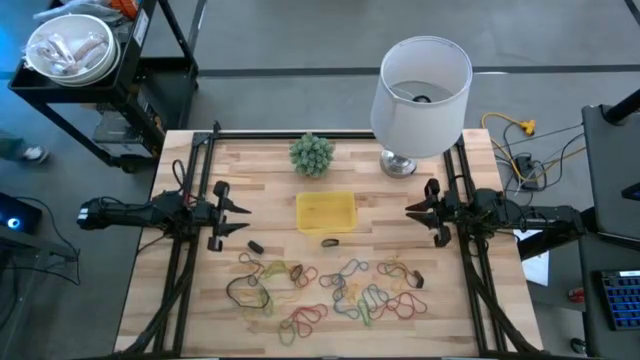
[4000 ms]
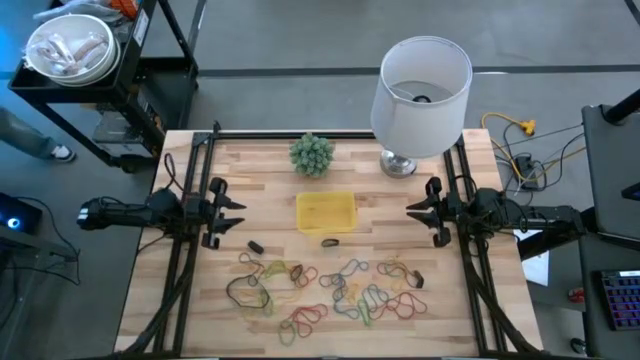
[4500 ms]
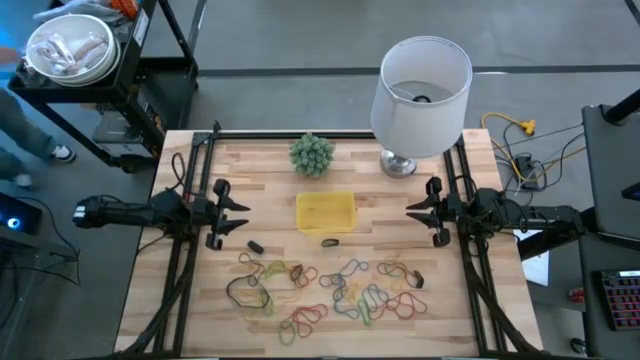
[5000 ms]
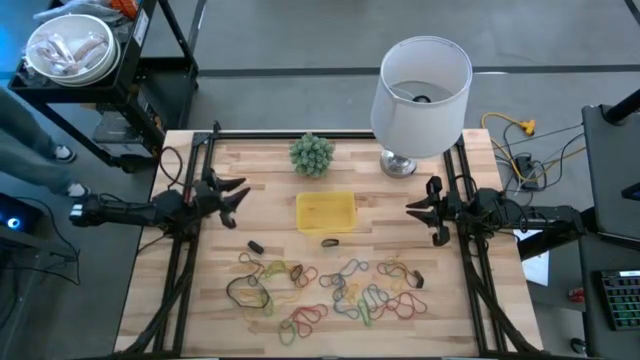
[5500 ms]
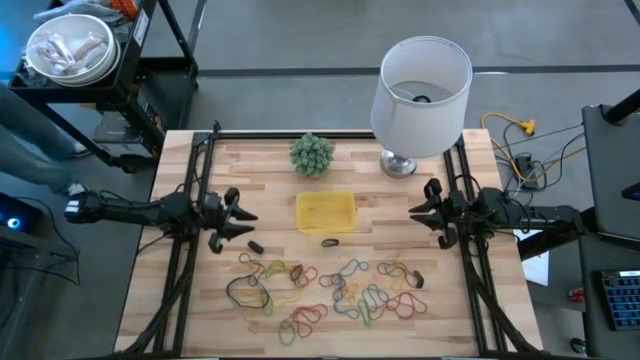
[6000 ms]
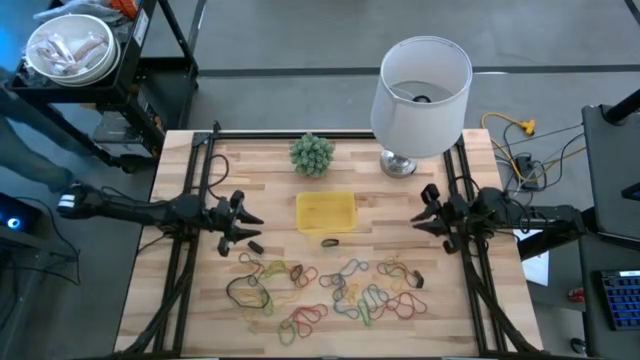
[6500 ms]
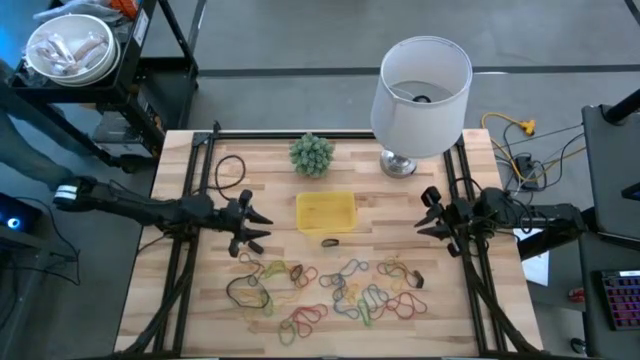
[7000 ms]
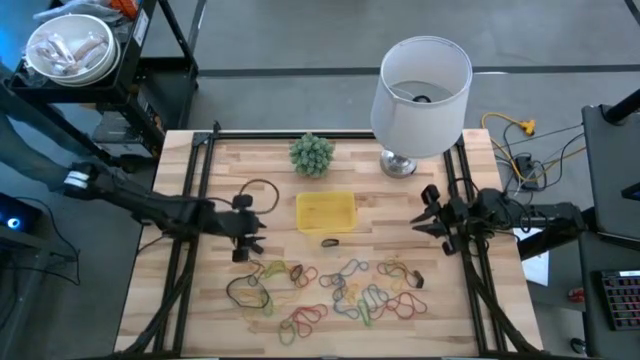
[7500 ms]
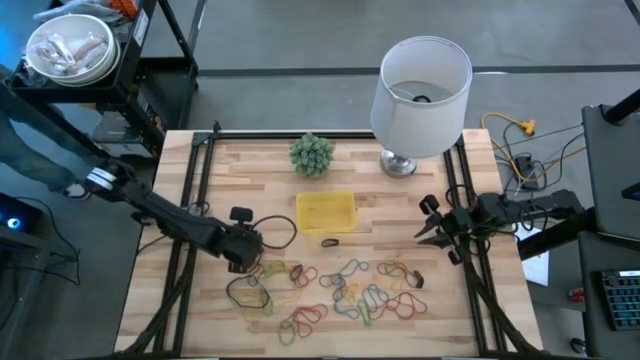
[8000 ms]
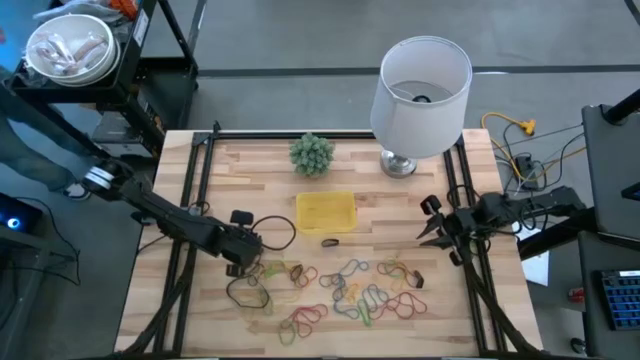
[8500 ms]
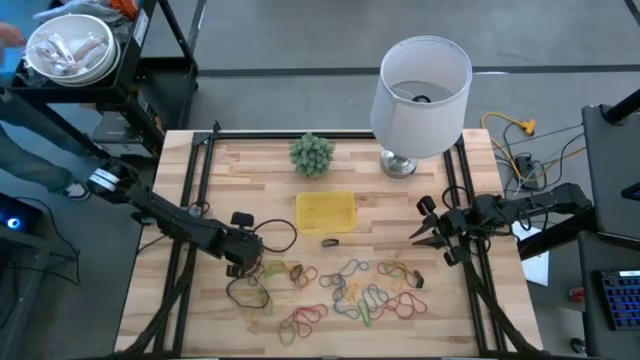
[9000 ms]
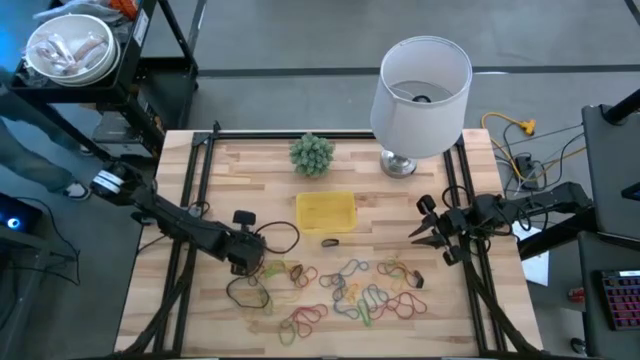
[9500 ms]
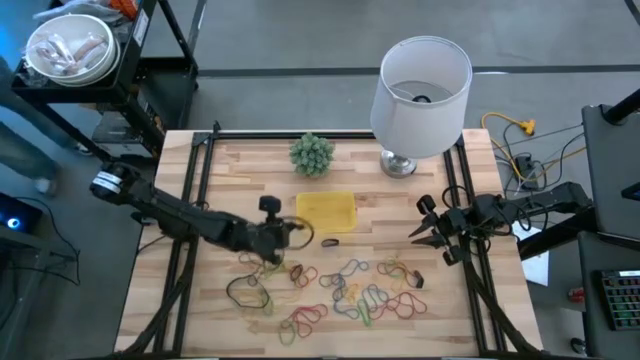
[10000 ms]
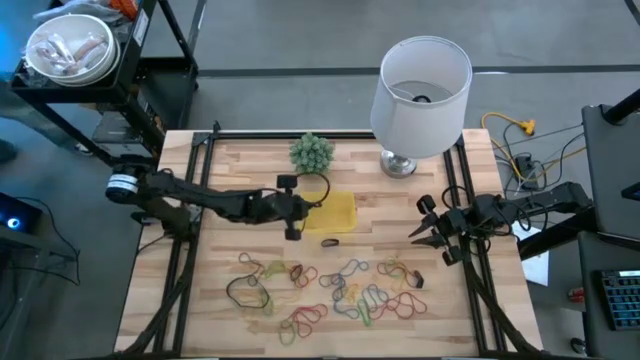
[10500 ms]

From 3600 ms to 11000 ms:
Task: Pick and place rubber bands into bin
Put the black rubber band into the yellow bin

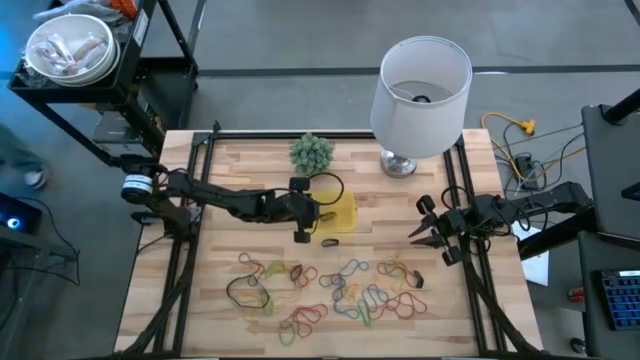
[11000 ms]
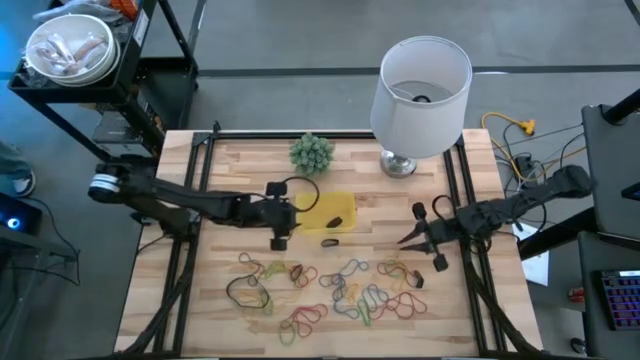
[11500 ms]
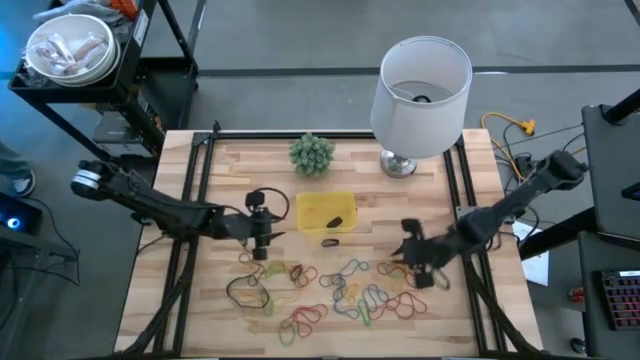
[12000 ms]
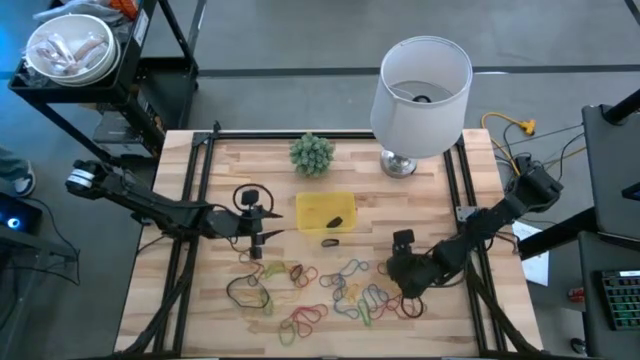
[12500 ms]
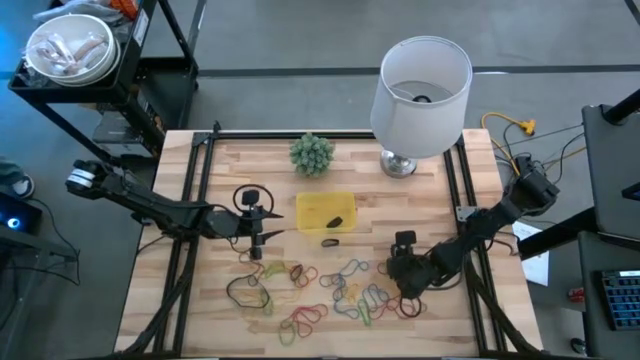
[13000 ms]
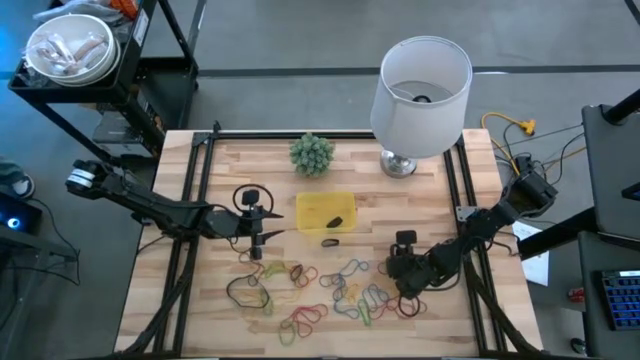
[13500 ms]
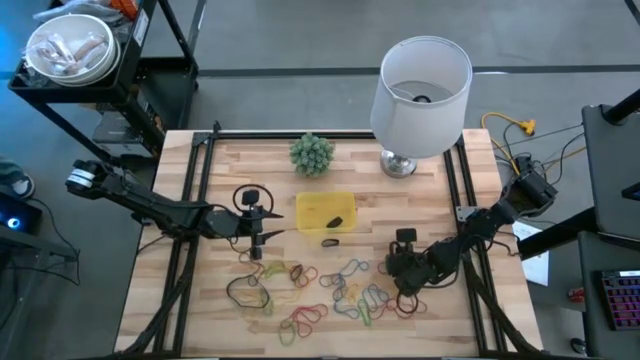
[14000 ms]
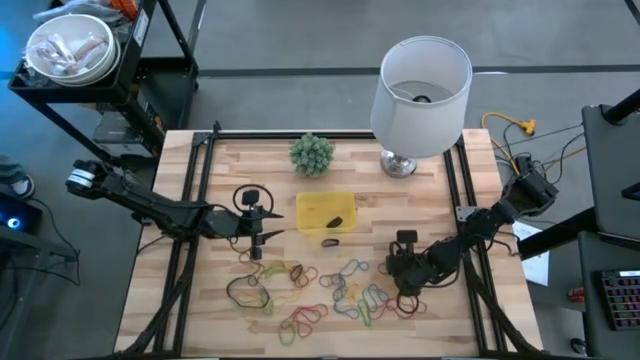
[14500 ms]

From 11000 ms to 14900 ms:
Put the green rubber band into the yellow bin

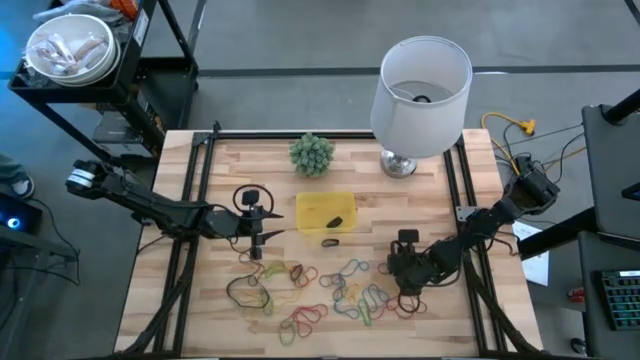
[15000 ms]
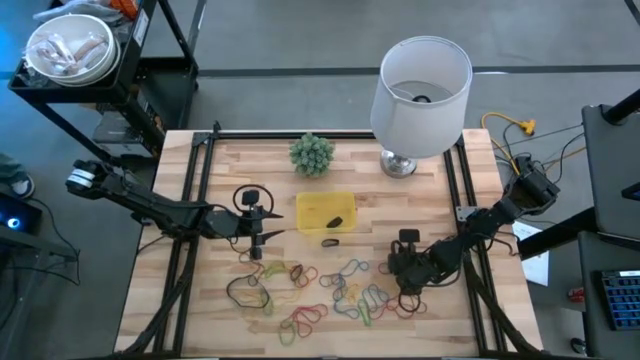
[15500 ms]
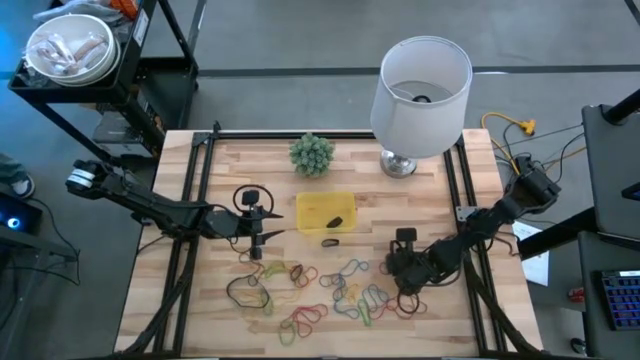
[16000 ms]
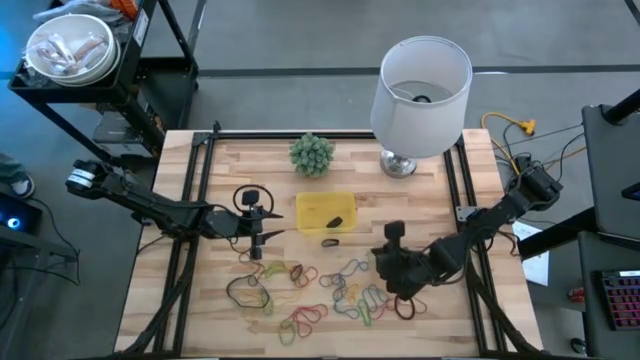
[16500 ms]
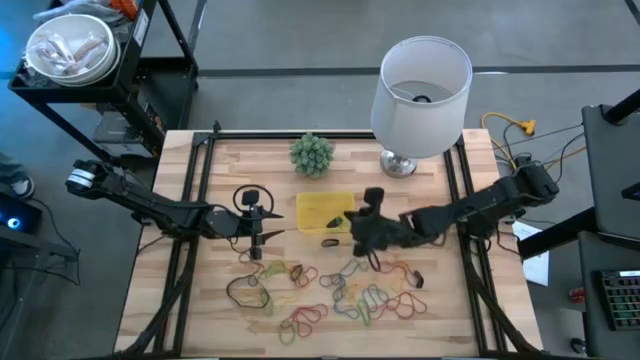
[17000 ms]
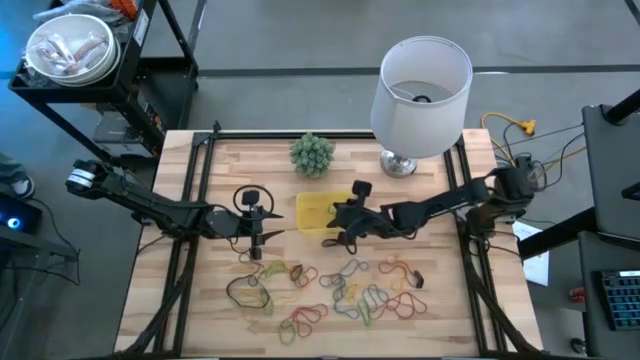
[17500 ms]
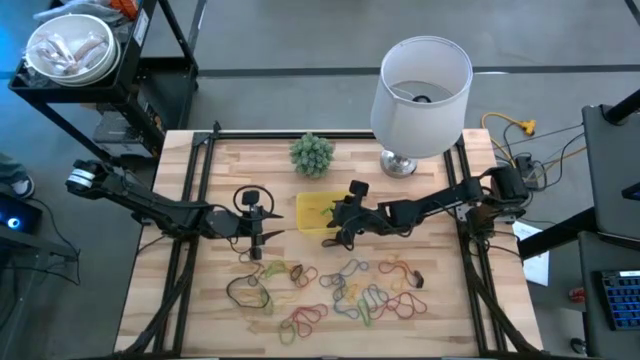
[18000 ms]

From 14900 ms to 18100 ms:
Put the green rubber band into the yellow bin

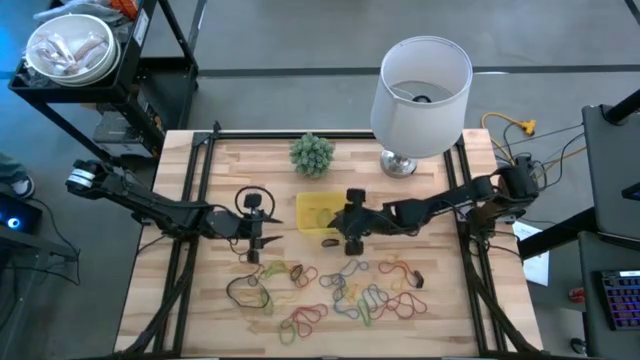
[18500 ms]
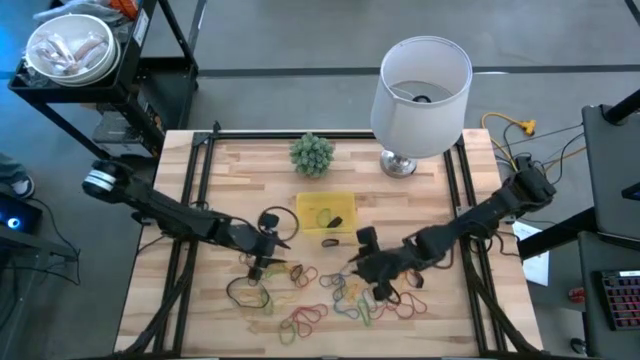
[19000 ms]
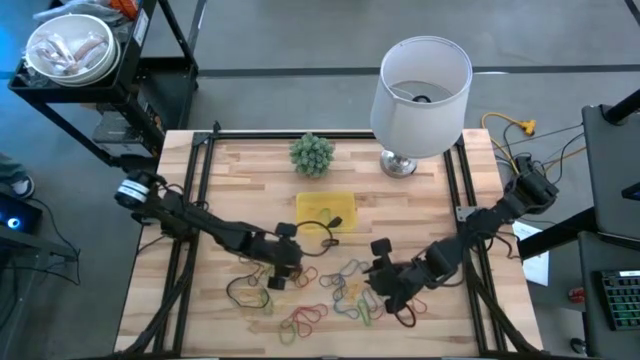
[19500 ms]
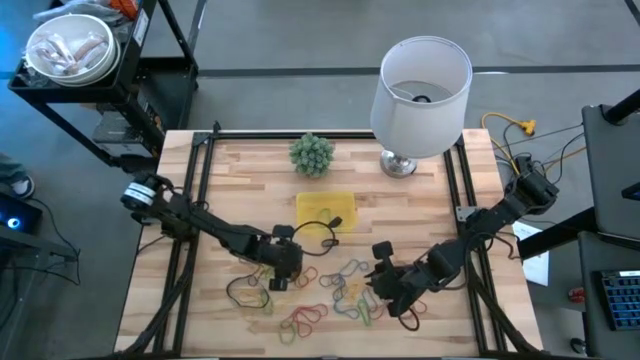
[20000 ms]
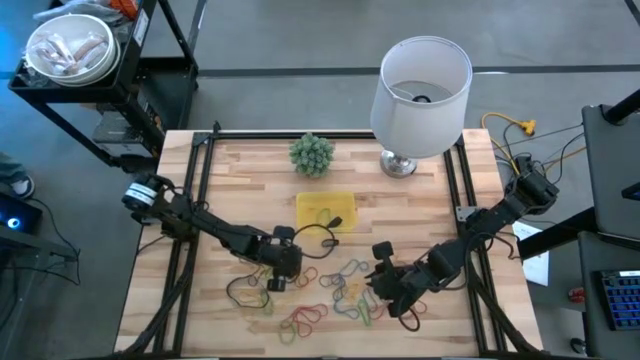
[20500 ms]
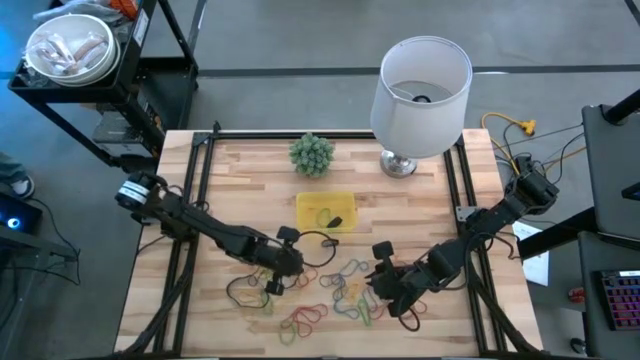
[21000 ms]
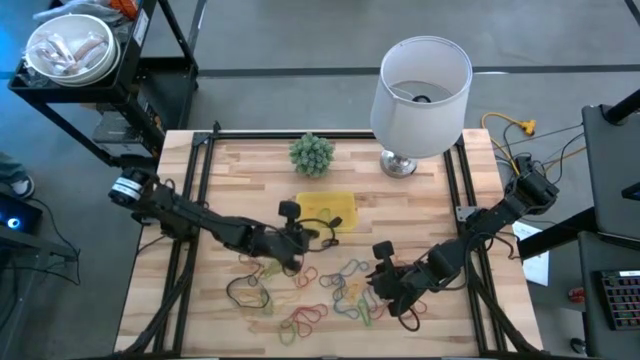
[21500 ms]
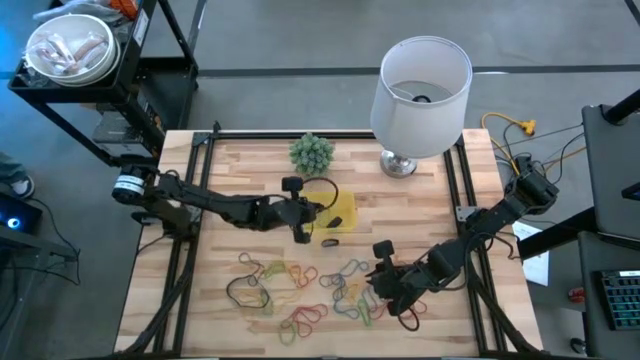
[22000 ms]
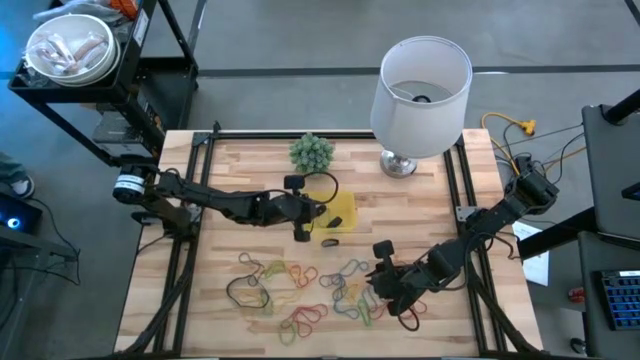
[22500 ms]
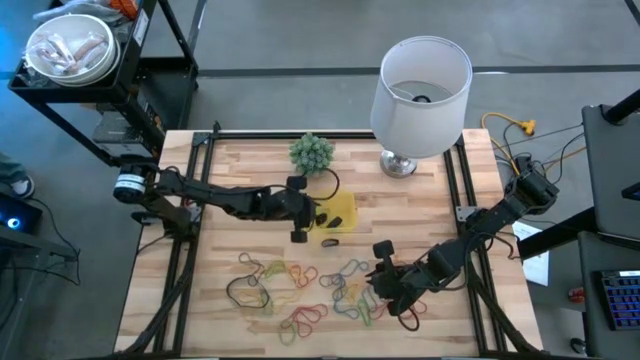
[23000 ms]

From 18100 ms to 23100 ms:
Put the black rubber band into the yellow bin

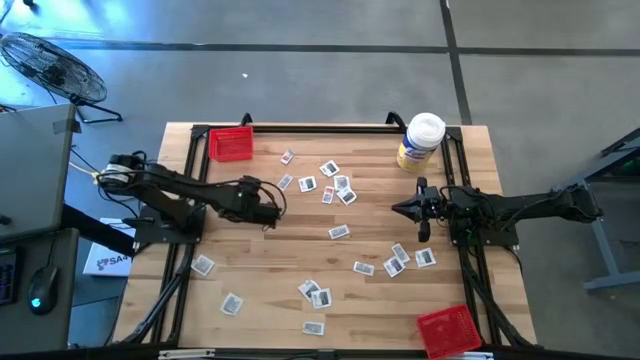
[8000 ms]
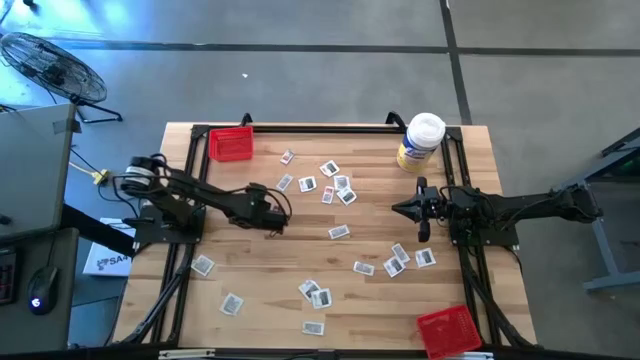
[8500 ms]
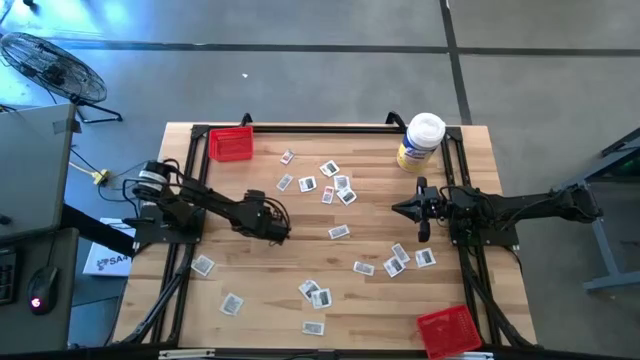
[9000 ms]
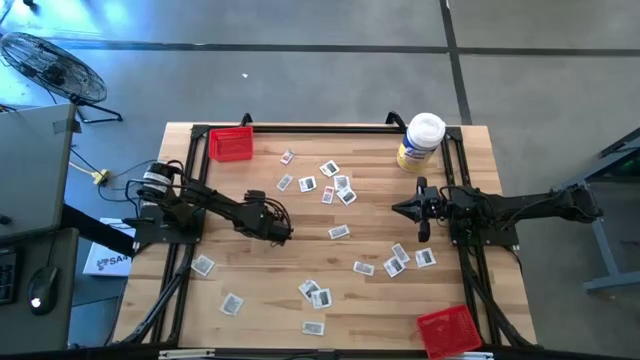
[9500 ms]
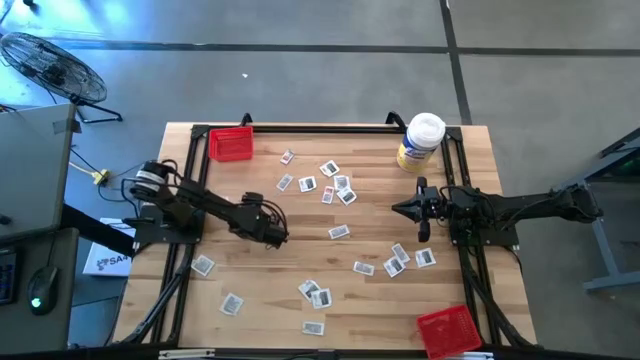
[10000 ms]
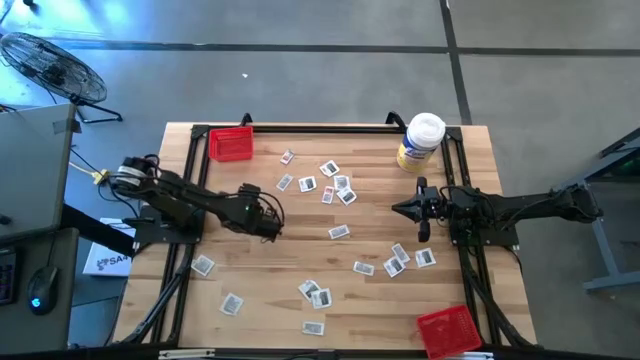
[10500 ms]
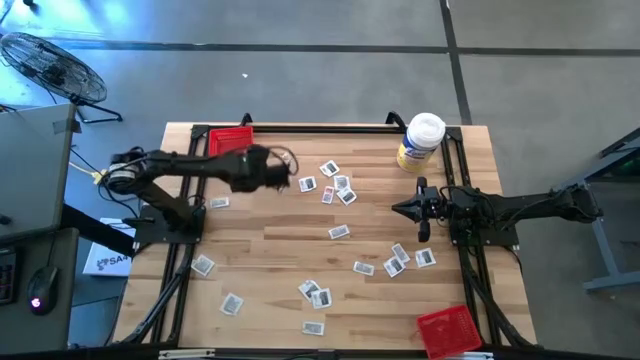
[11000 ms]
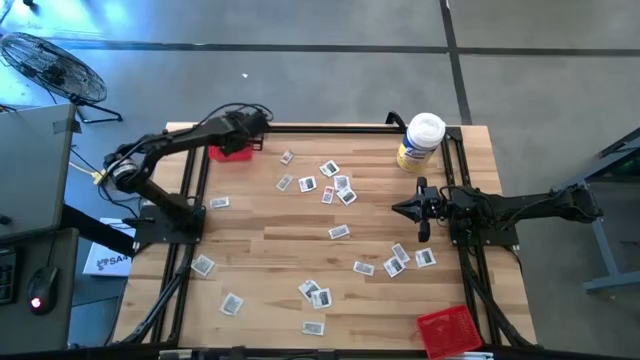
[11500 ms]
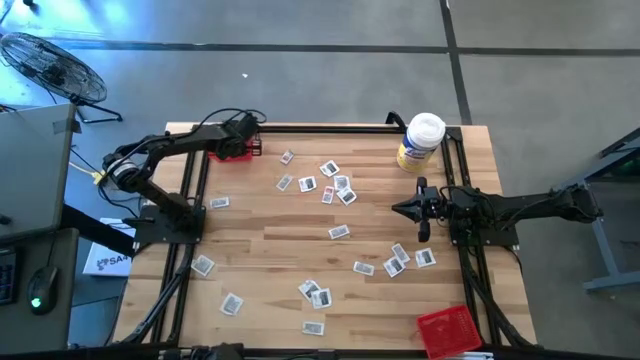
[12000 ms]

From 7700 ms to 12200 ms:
Task: Pick & Place First Aid Supplies
Put the white and orange ointment pack into the top red bin
